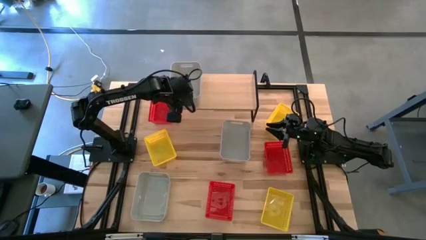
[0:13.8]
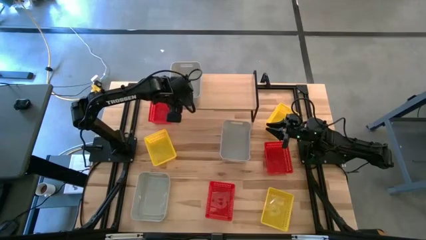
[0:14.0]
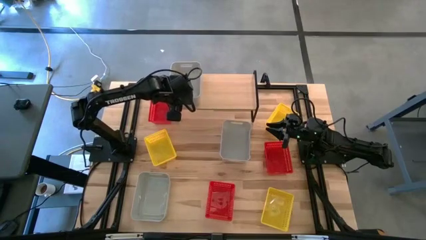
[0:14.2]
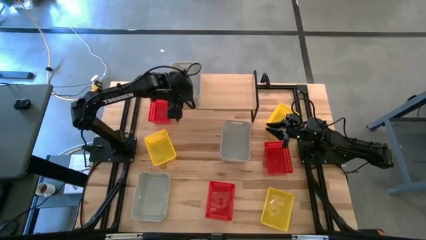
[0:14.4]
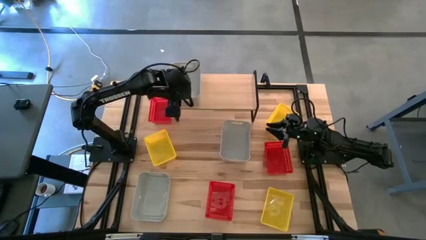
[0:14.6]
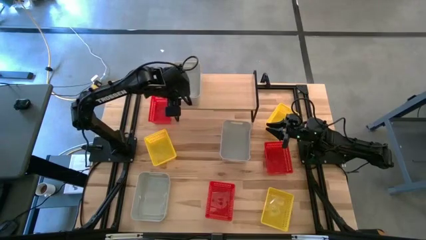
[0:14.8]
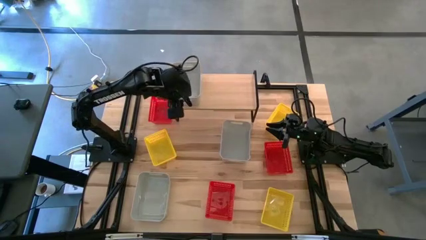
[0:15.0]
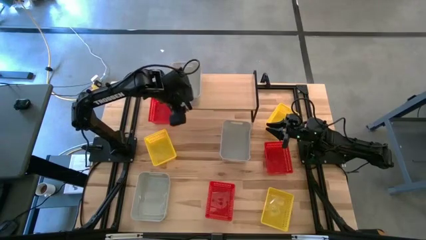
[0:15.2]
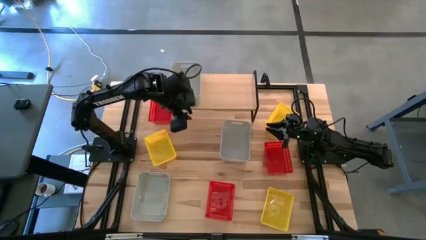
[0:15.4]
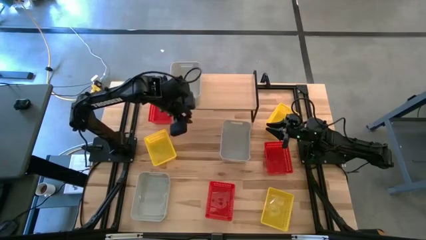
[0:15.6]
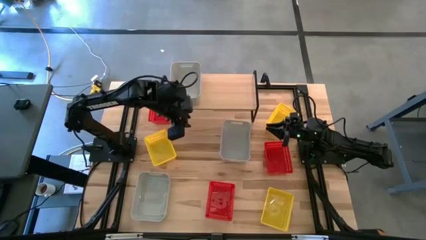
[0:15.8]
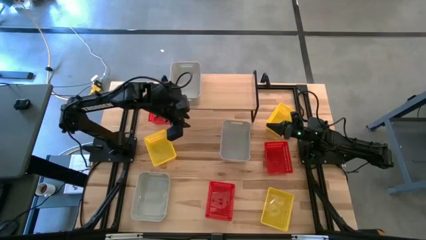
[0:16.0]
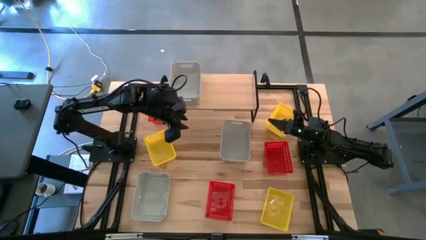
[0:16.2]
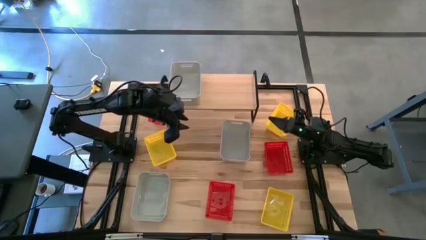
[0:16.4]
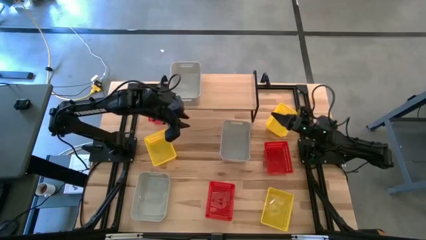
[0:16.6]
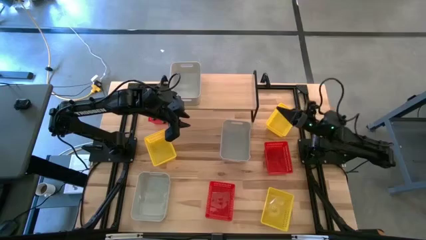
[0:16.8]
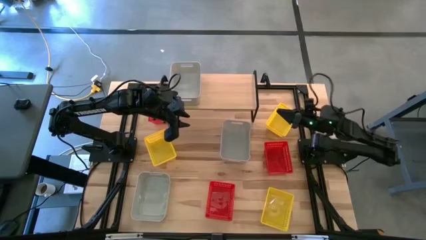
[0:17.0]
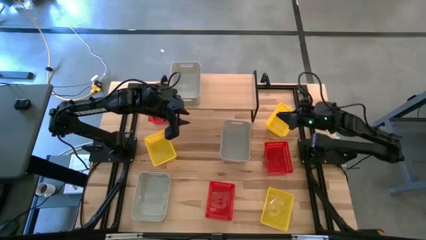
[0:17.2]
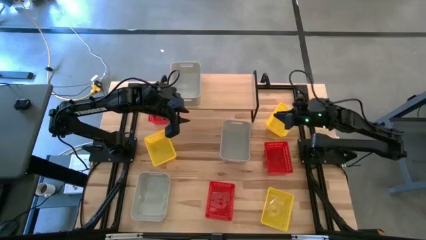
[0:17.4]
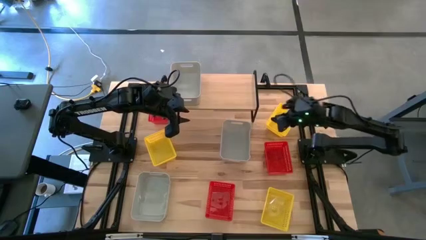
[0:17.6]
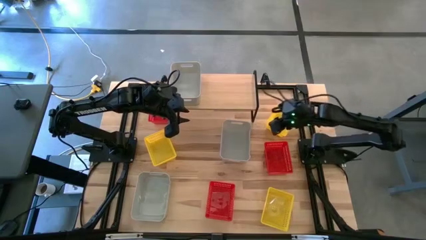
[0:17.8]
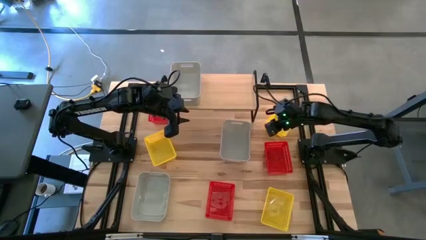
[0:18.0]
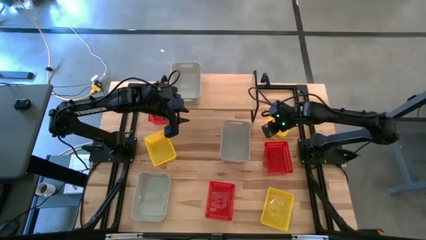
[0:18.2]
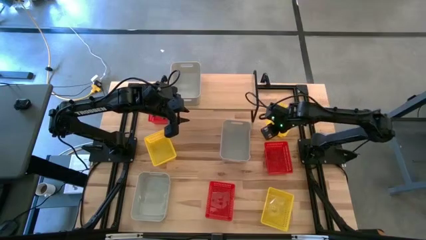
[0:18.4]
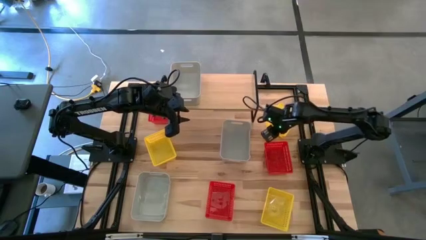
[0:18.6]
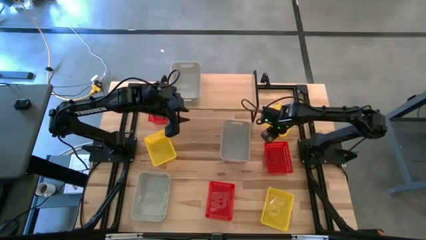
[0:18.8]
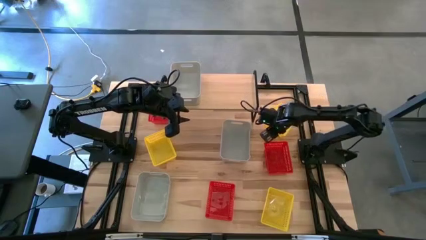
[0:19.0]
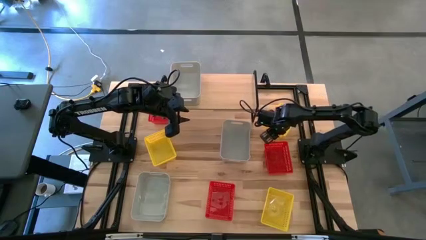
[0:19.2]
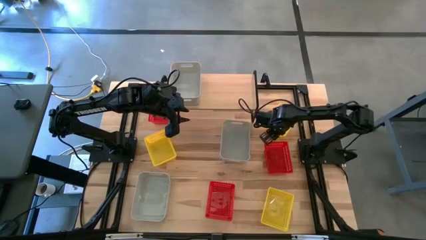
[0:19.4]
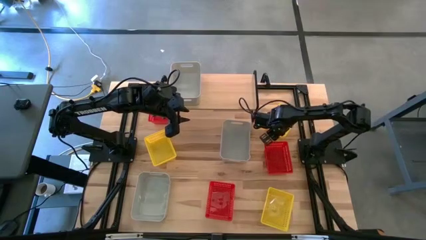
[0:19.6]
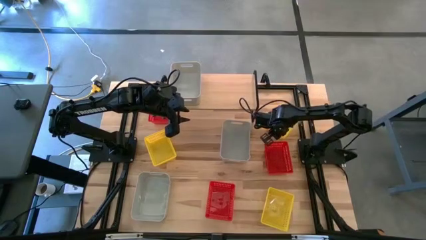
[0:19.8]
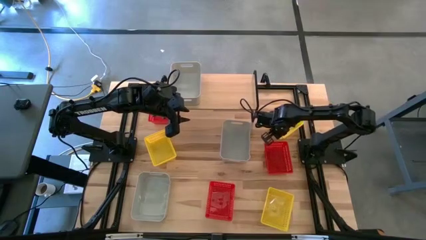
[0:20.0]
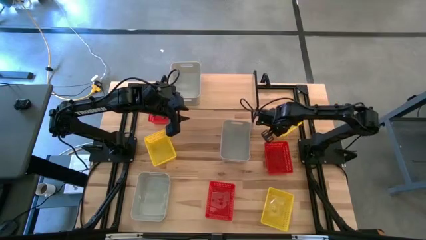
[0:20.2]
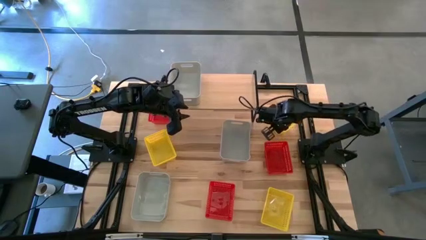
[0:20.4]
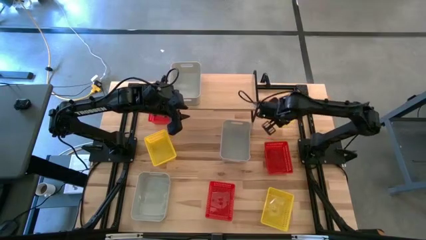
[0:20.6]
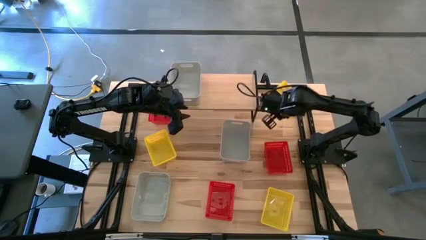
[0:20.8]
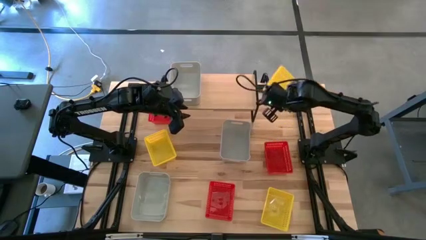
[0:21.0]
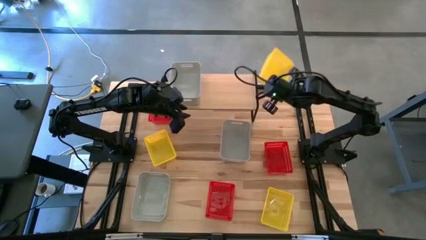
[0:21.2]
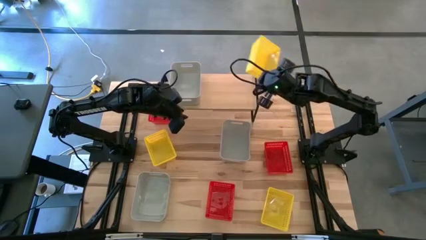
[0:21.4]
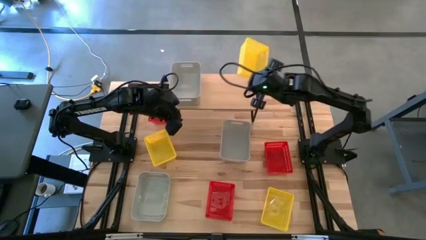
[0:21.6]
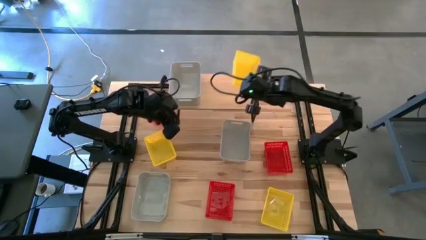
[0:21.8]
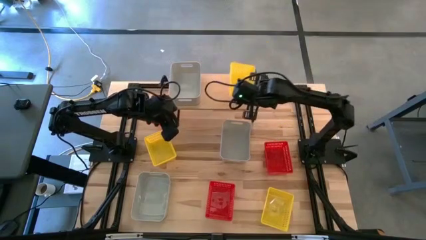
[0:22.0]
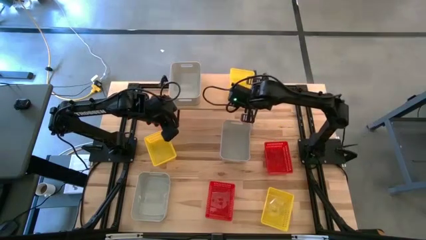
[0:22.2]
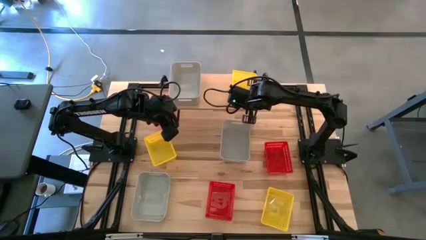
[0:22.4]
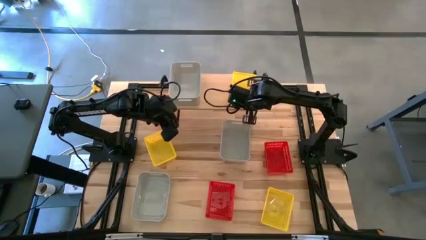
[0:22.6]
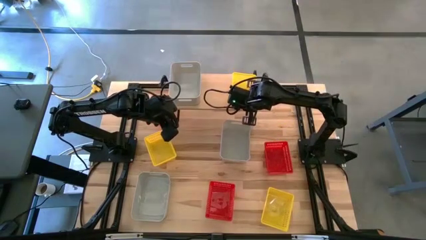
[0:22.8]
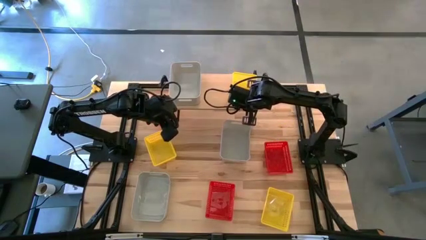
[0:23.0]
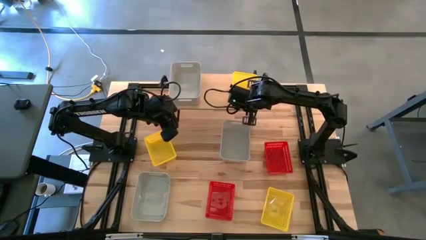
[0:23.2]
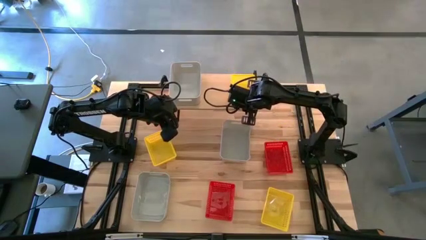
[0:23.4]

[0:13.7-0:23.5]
Task: Stack baskets on shelf by color
Put the top yellow bin on the shelf

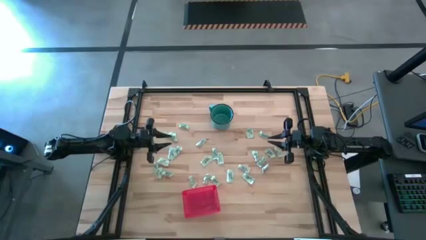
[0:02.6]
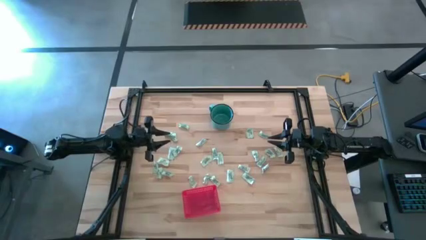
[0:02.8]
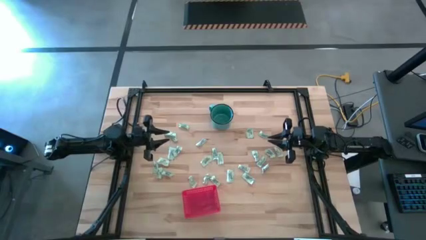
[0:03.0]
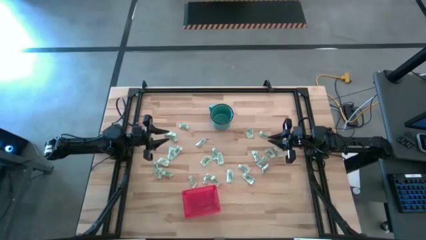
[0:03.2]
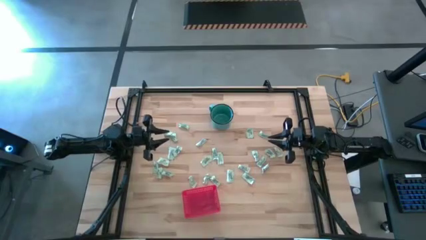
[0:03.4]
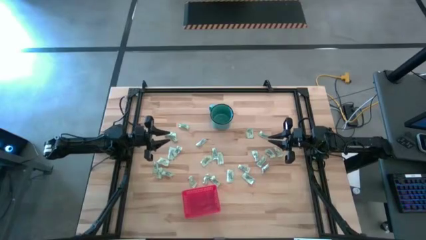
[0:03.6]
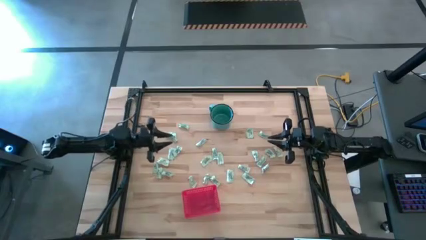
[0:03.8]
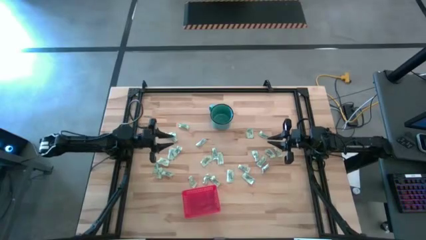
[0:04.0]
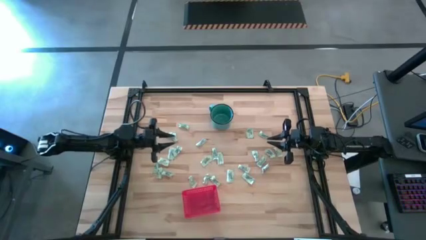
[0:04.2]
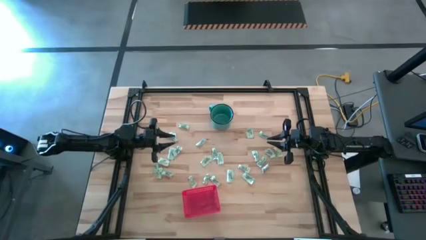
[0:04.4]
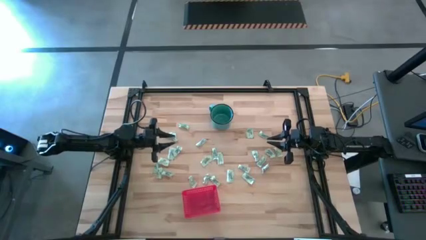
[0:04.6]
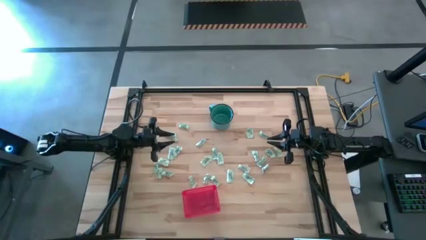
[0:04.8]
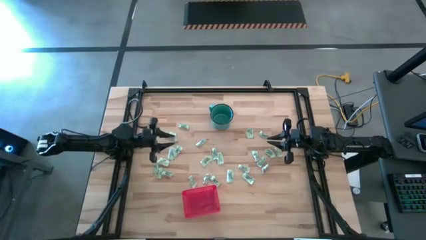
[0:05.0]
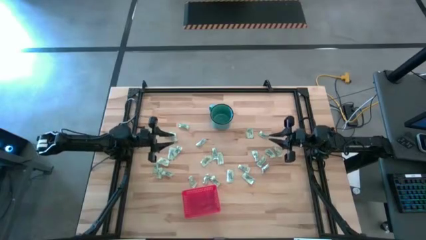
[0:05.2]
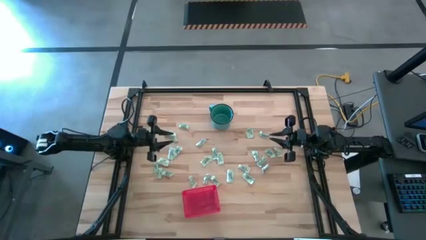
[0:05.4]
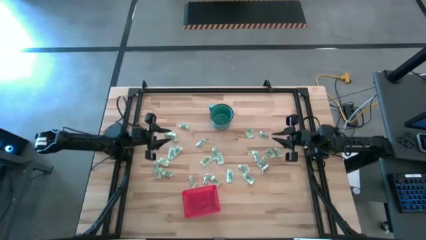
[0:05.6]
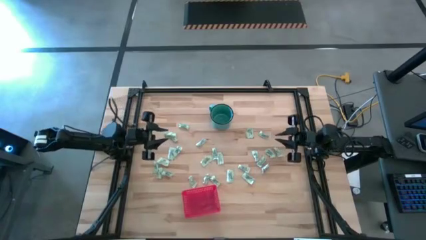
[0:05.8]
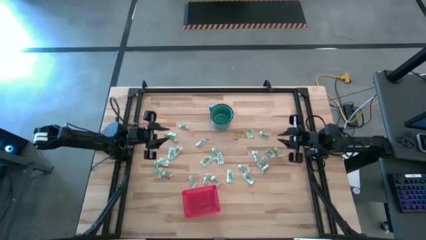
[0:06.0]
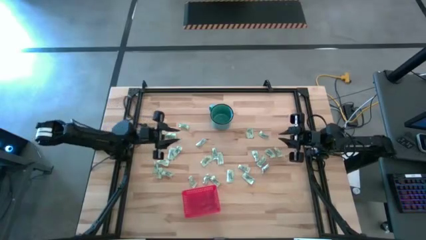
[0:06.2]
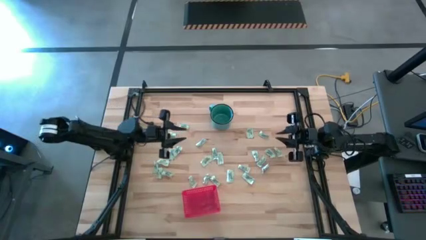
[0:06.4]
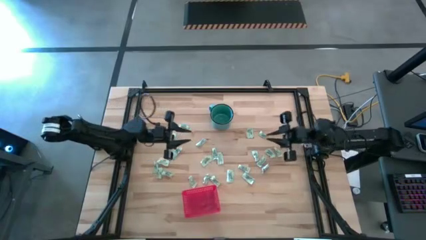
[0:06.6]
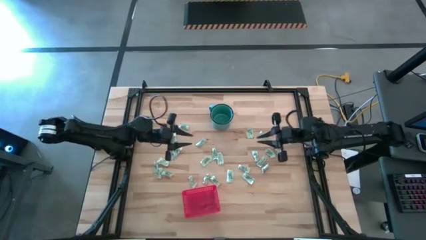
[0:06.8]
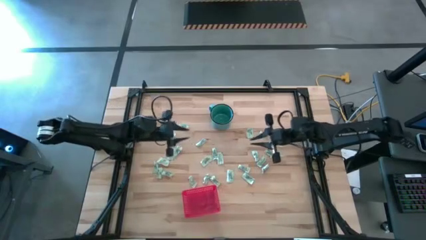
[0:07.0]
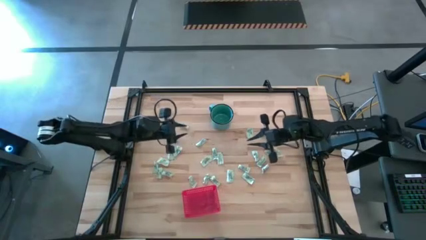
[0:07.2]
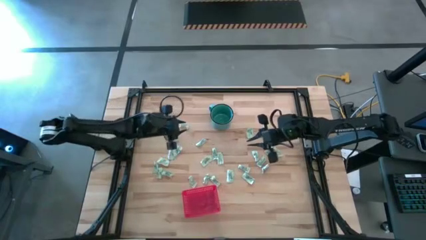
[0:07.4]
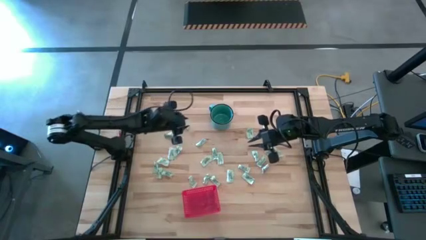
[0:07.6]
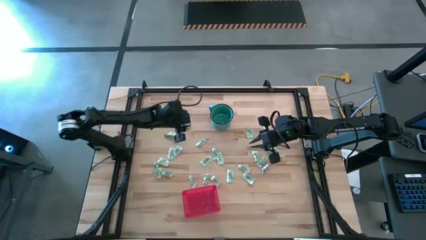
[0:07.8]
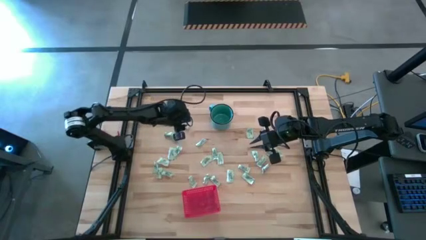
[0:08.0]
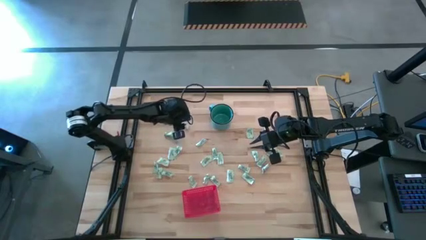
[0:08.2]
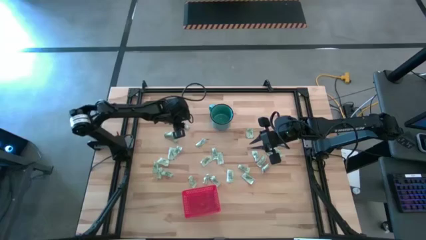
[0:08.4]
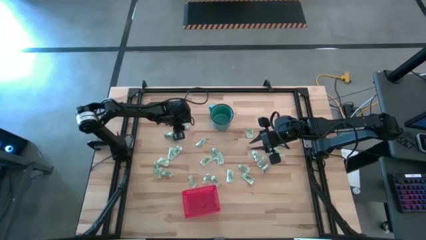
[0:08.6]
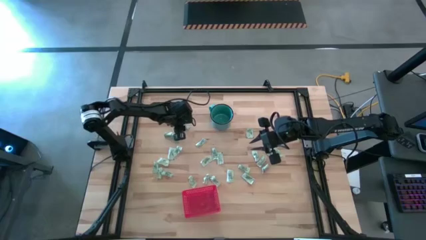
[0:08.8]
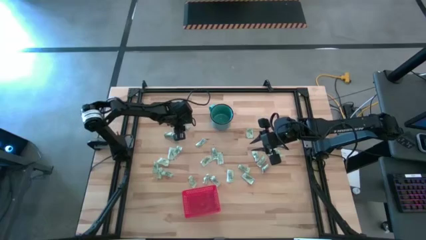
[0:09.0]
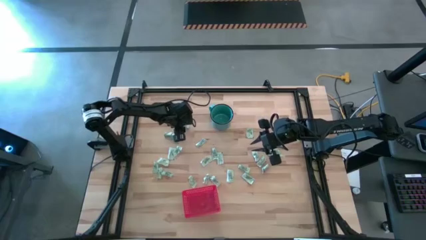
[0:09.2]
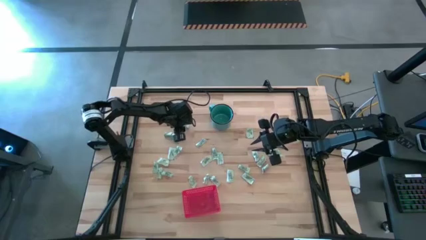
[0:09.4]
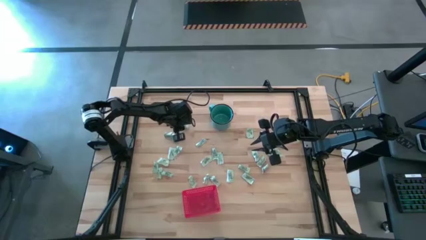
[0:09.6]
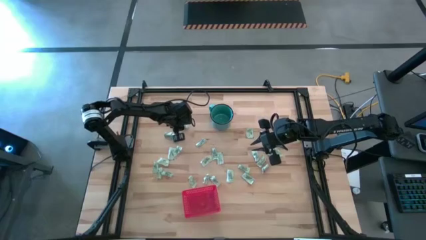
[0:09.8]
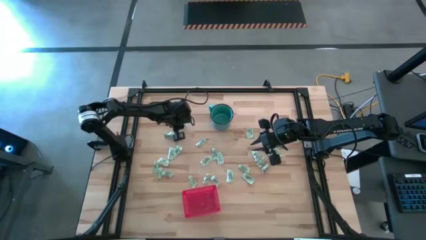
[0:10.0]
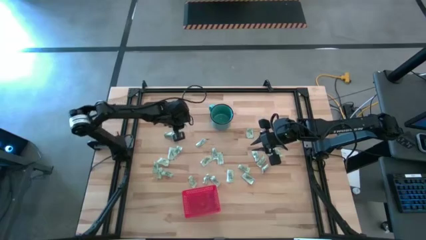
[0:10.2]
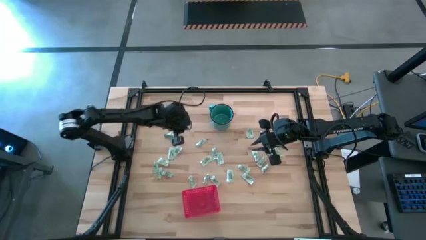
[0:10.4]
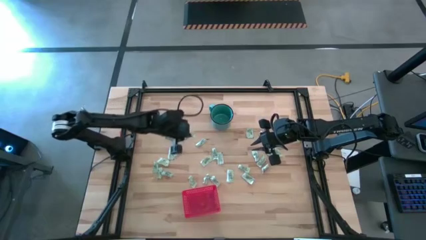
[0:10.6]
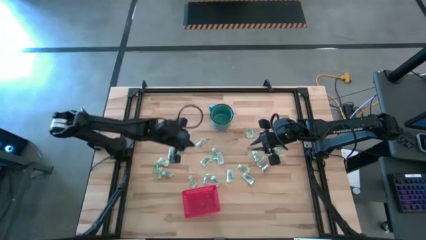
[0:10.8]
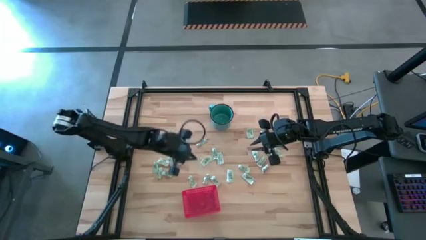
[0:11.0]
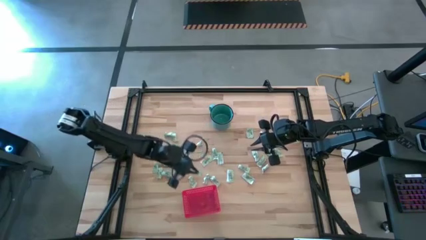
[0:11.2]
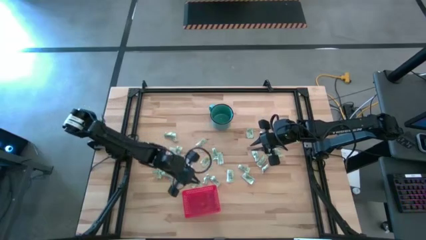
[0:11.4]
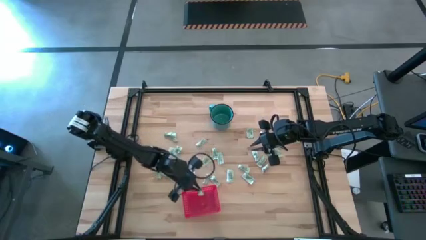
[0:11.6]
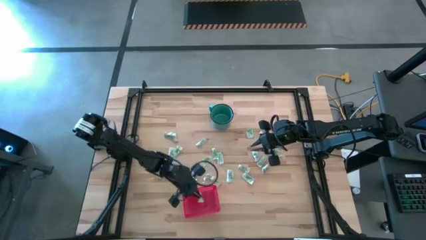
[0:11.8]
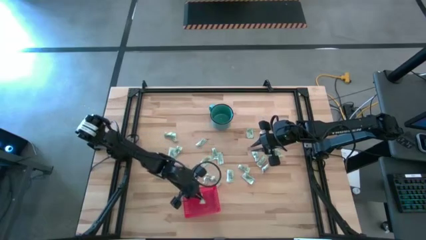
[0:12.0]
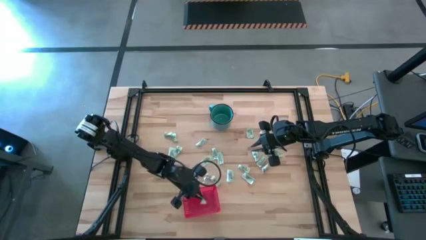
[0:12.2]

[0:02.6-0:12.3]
Task: Pick and place items into bin
Put the green stevia packet into the red bin
